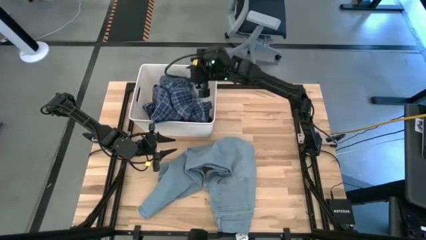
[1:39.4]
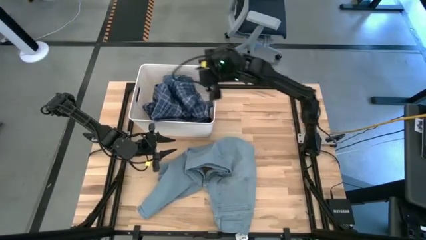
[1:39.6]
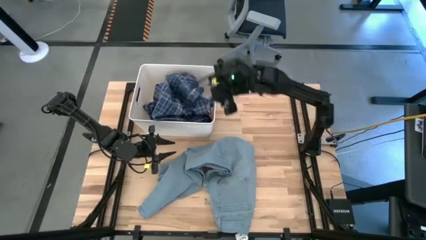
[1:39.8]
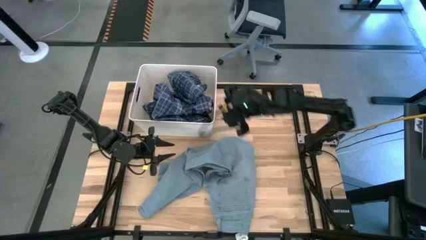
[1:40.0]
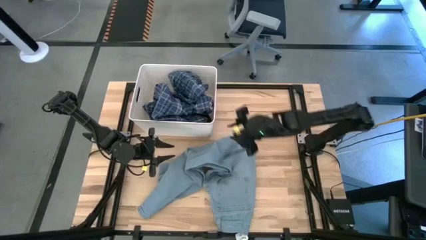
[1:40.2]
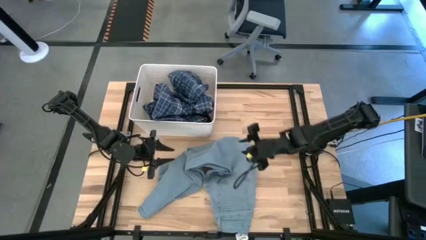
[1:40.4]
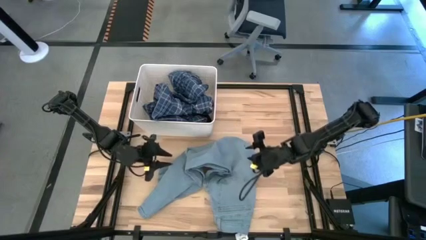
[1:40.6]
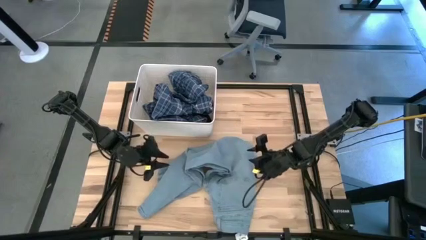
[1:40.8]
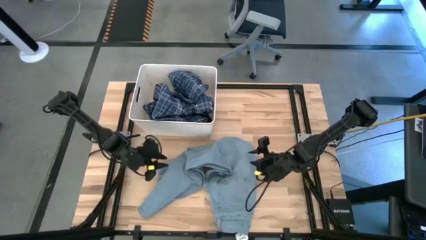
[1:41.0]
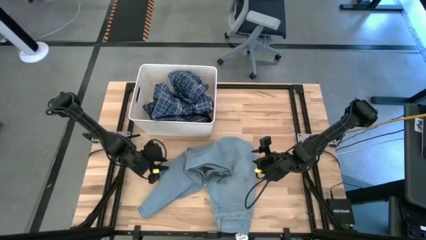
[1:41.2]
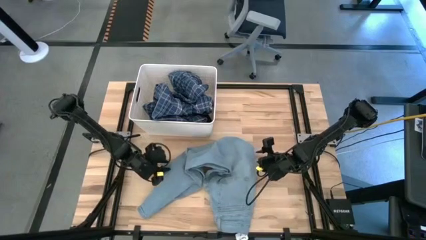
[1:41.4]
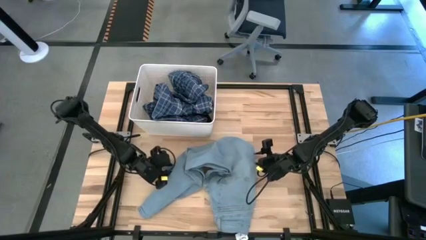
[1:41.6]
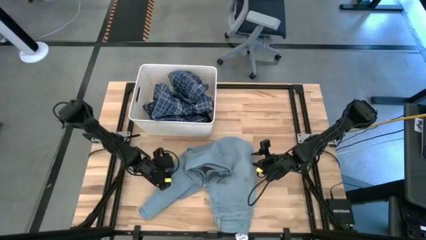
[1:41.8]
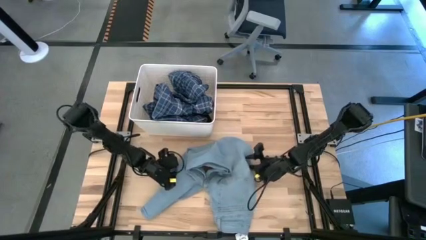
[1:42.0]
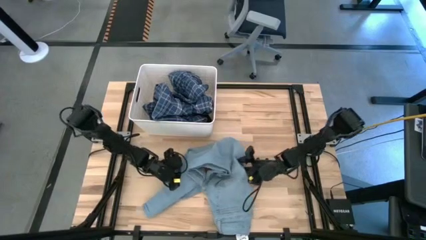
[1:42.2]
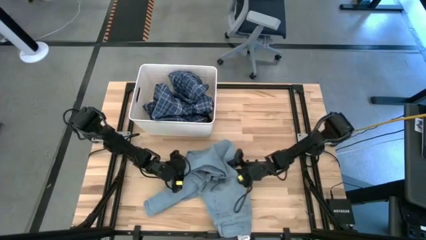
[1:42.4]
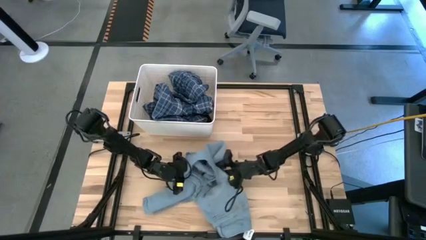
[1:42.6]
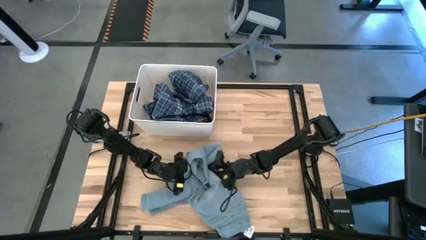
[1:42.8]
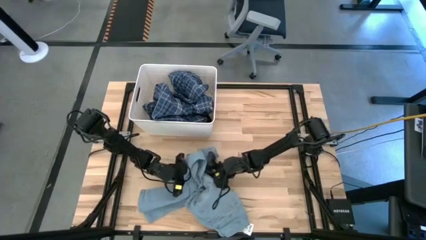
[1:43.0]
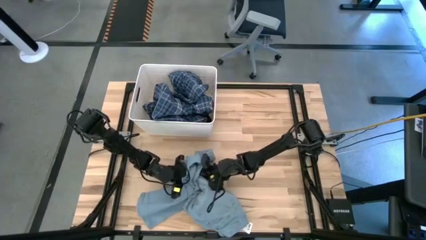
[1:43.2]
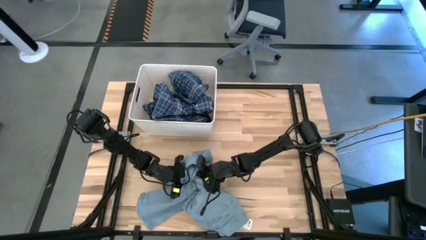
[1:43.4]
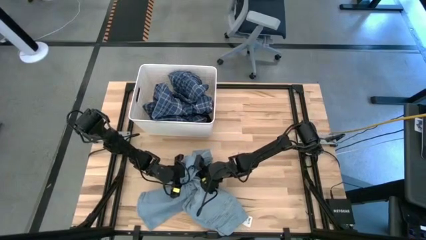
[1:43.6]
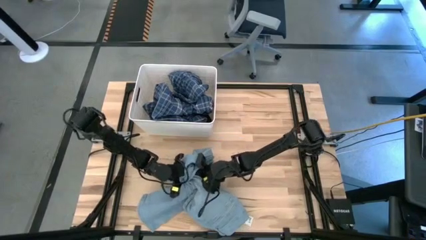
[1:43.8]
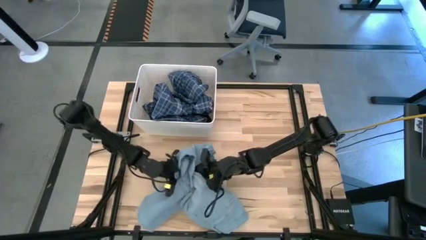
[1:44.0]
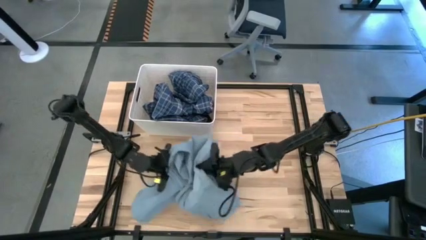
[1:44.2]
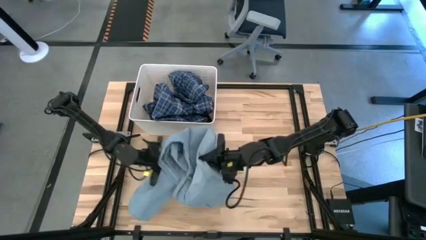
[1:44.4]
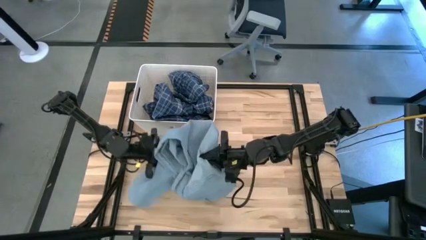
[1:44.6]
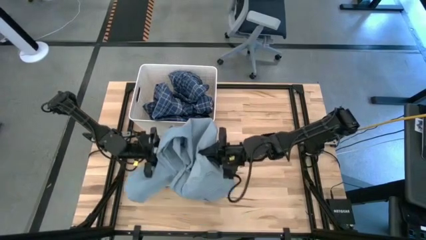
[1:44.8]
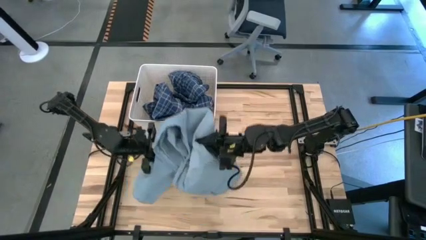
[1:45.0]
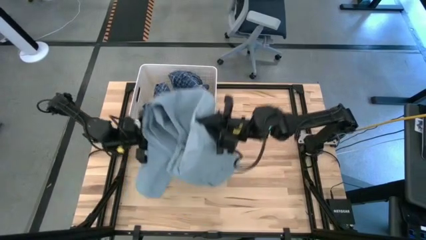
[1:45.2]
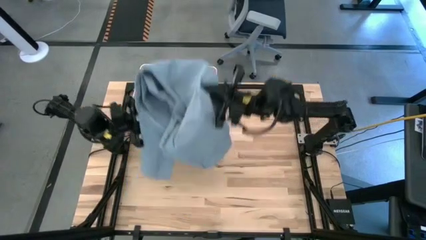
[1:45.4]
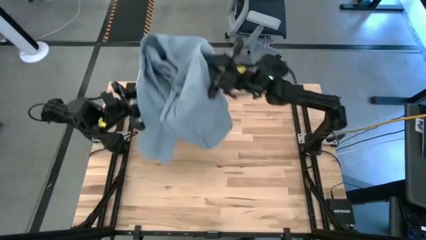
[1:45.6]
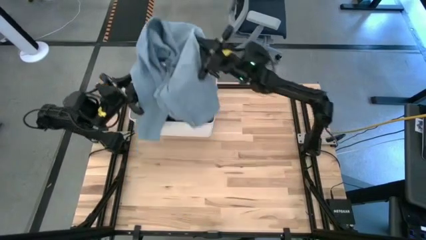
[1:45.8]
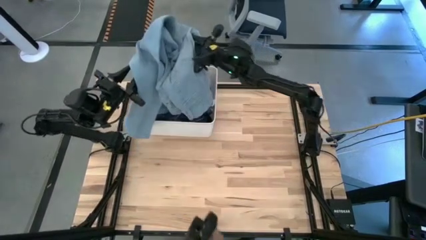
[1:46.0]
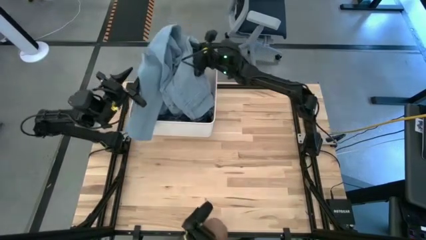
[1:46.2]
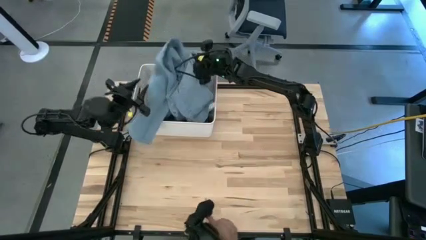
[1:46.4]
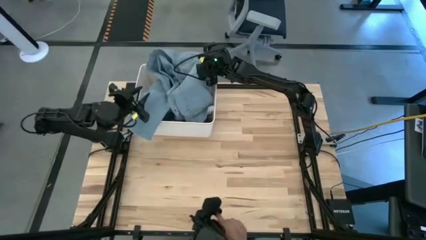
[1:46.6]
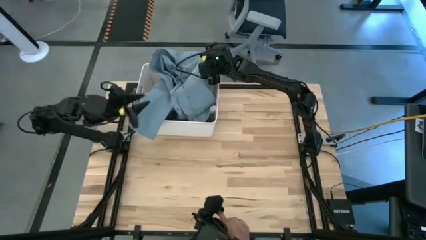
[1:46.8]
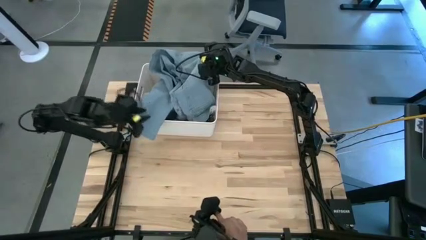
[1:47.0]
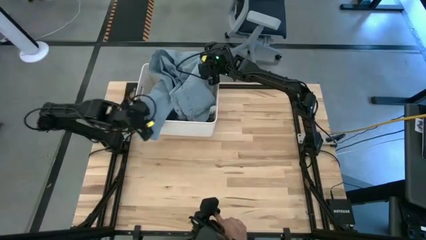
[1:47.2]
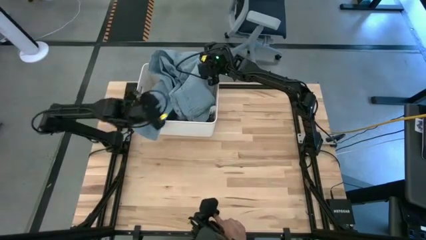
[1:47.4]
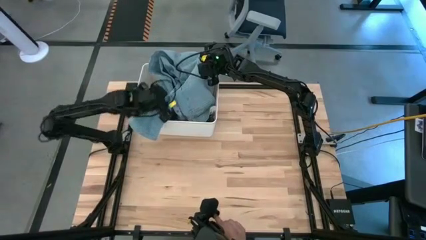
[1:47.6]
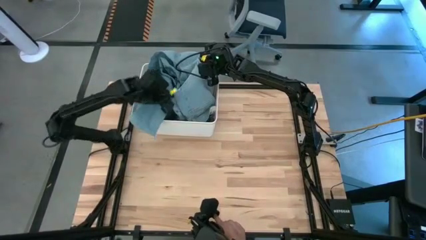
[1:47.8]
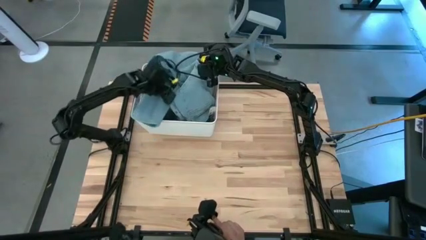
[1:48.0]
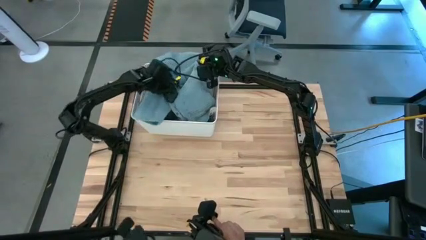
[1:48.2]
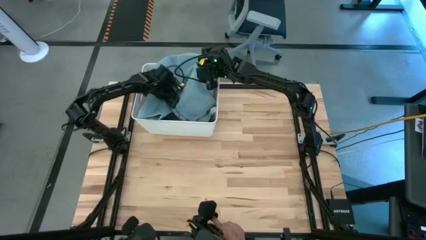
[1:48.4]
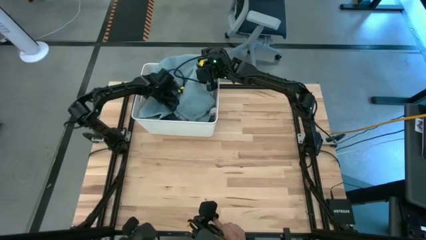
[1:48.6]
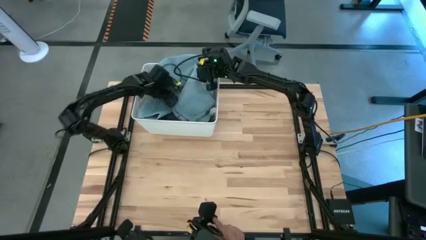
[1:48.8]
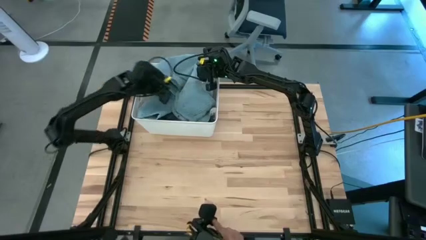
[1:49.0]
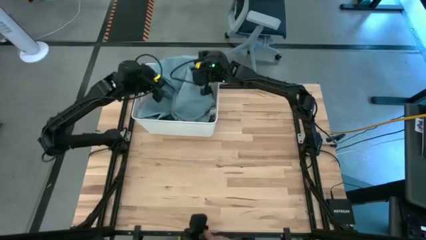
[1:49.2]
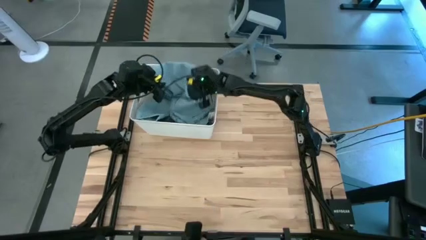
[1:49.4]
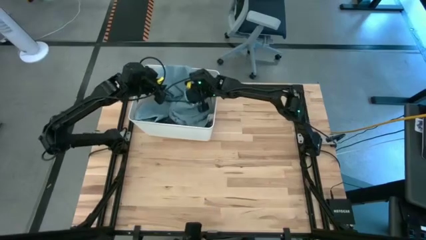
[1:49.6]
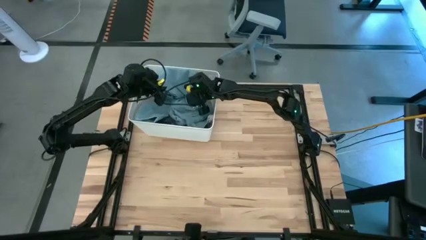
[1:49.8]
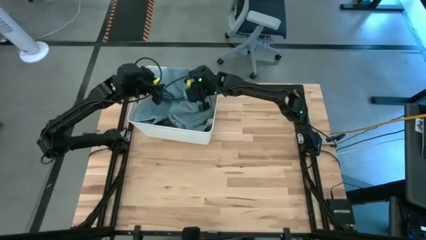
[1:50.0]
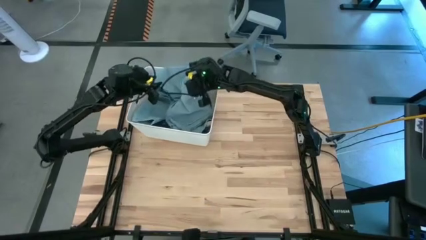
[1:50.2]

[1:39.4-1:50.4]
Task: Sort clothes
Put the blue jeans into the white laundry bin

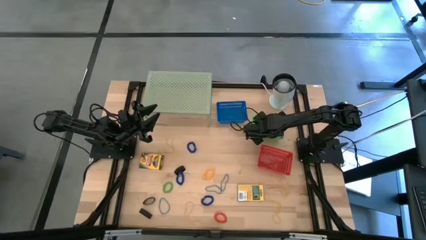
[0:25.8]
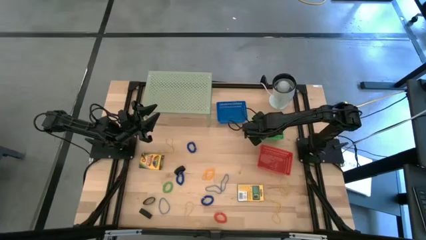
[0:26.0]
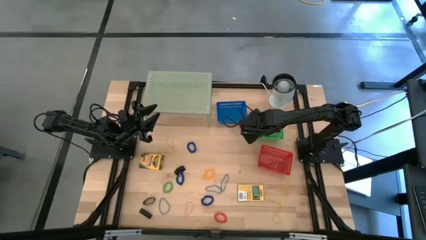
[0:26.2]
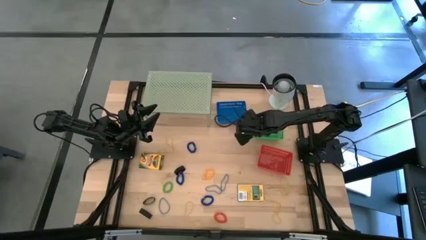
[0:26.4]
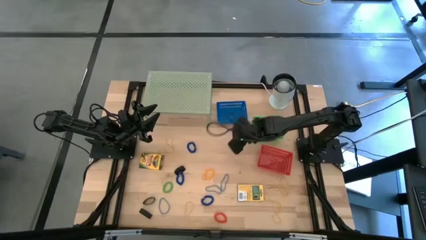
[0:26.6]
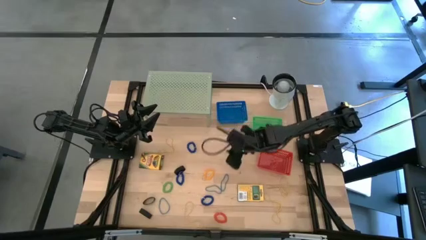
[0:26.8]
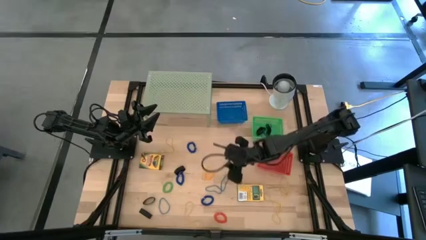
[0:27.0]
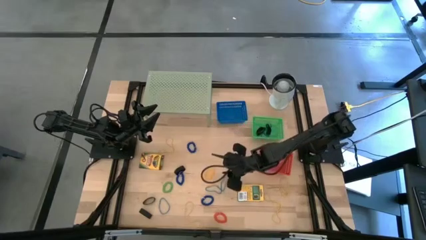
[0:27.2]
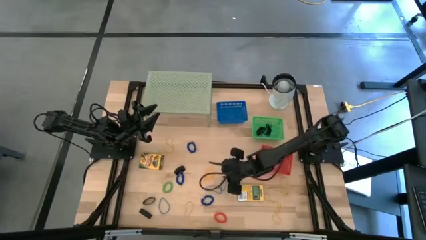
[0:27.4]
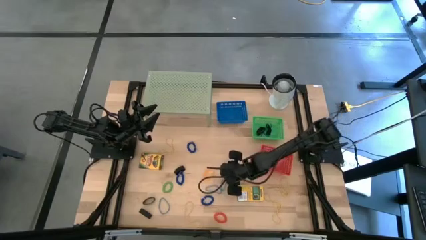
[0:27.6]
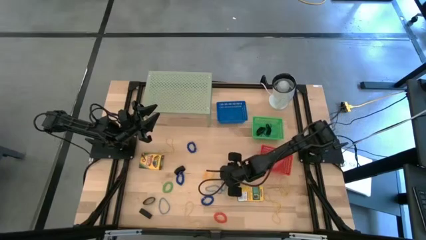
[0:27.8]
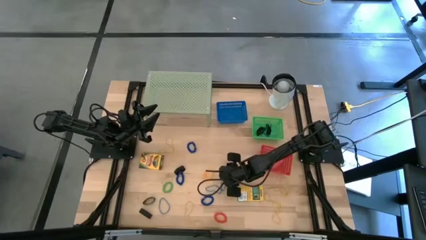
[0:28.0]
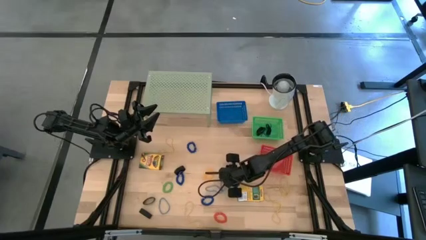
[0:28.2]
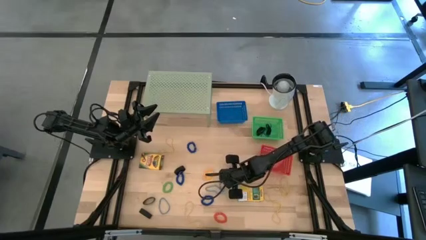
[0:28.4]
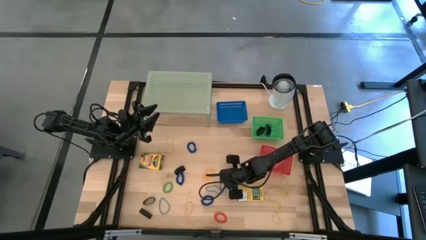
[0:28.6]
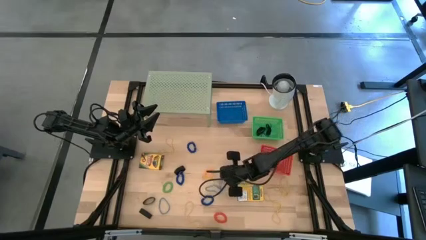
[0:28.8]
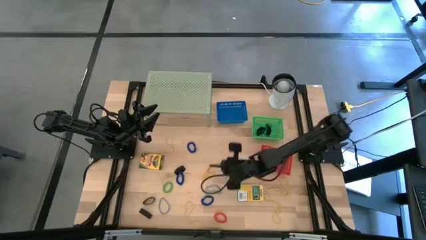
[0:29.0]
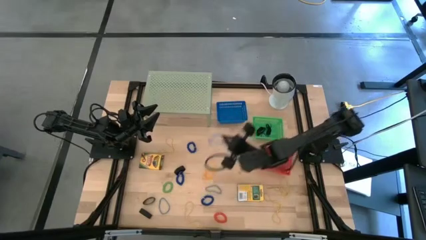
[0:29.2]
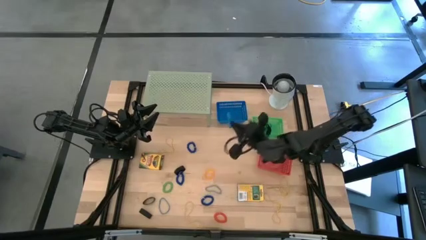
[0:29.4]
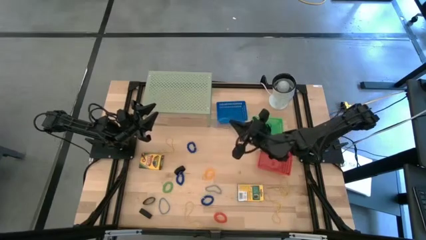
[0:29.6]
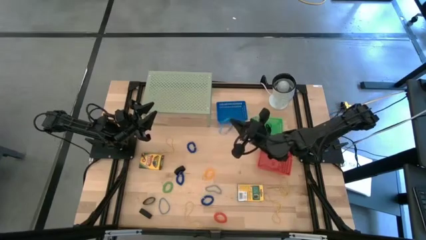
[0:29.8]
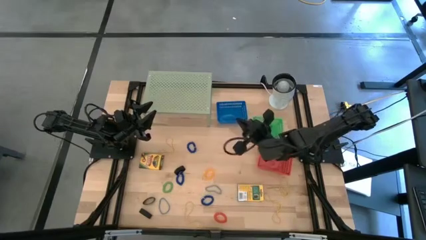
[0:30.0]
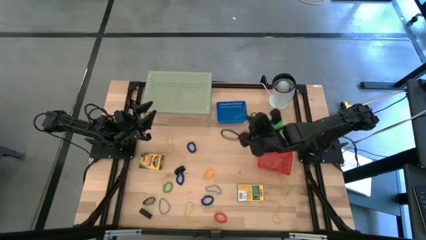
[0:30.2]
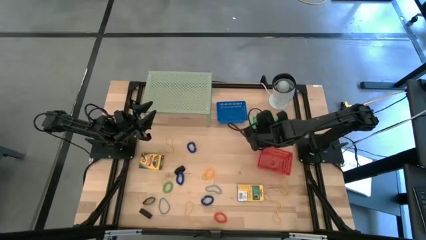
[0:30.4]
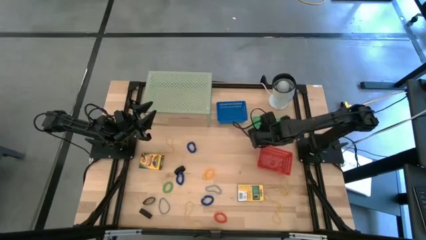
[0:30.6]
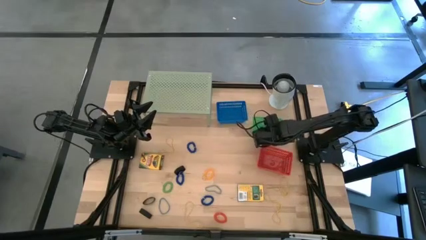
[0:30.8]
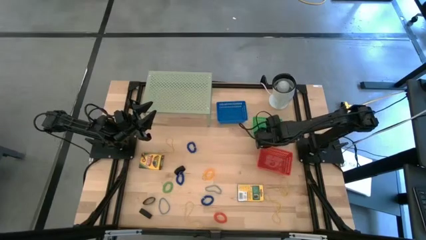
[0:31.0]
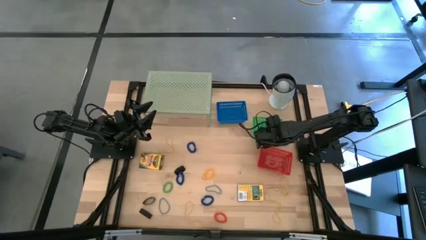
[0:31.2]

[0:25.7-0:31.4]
Task: Pick & Place Office Desk Supplies
Put the blue rubber band into the green bin
